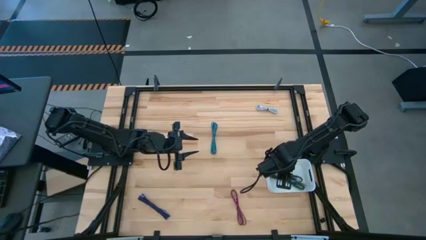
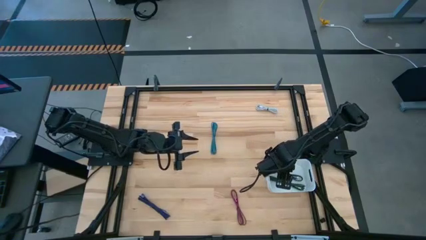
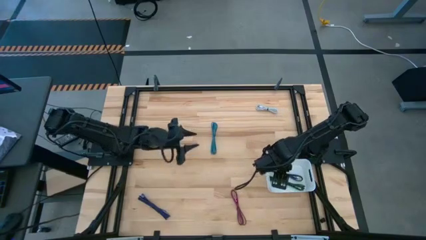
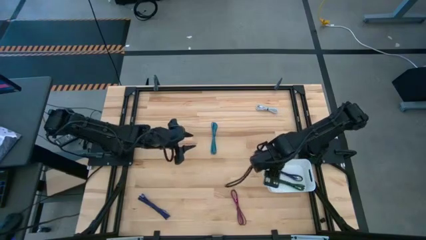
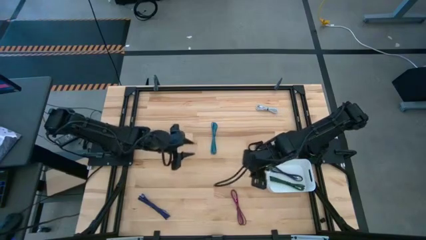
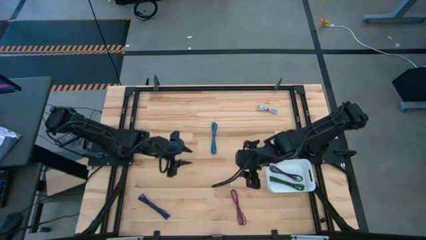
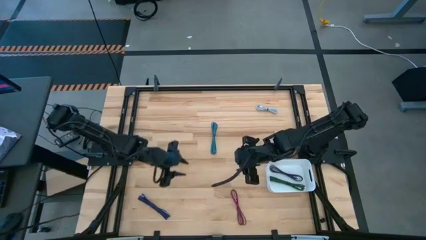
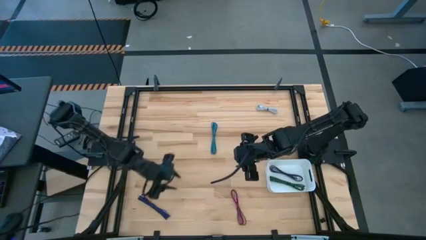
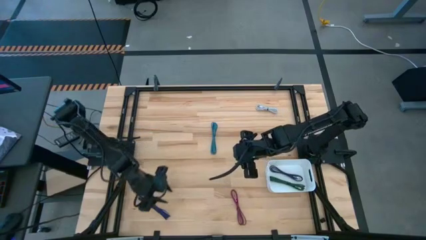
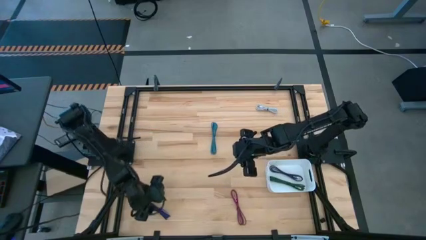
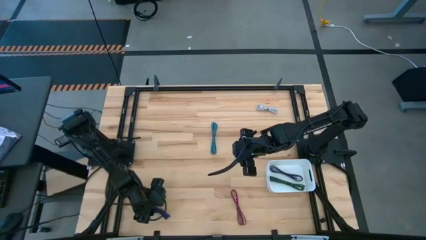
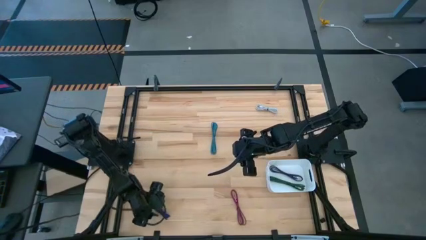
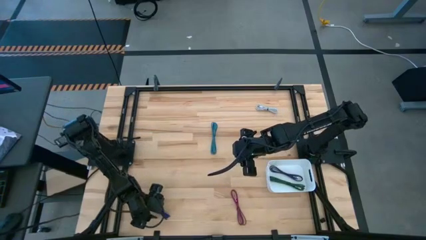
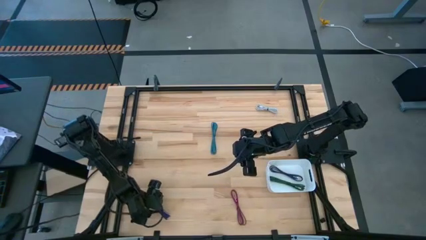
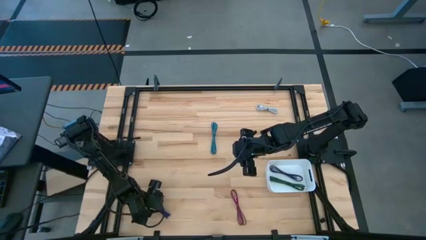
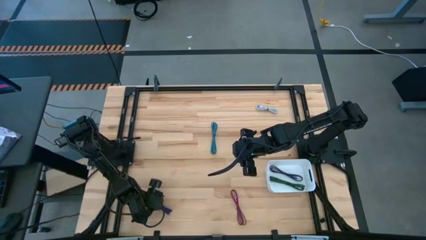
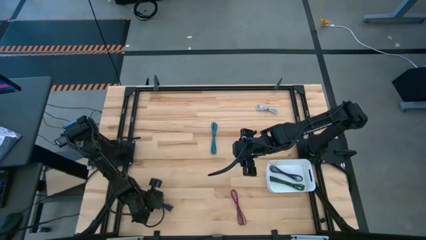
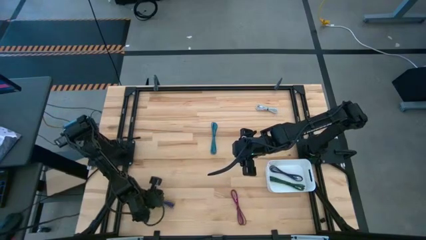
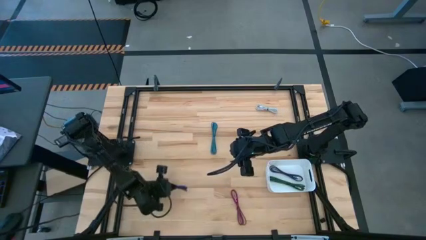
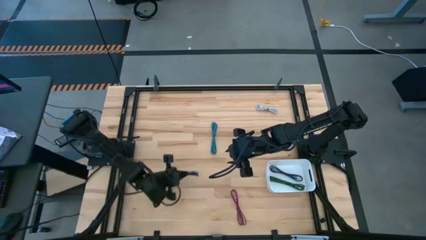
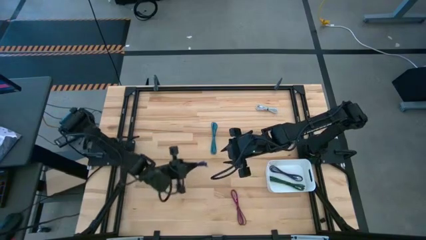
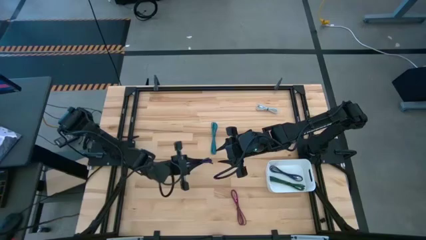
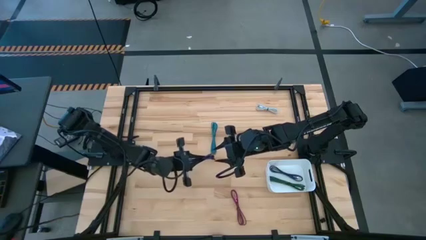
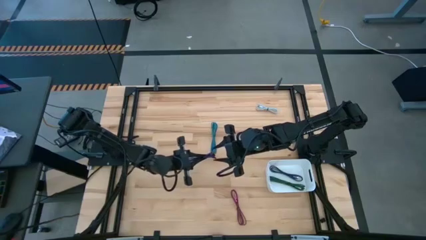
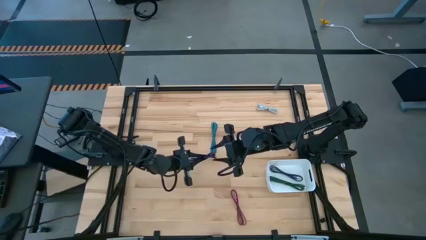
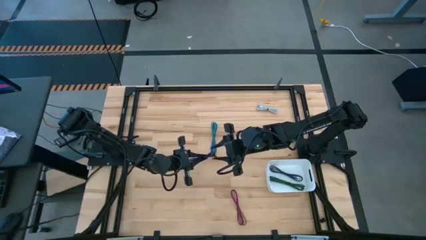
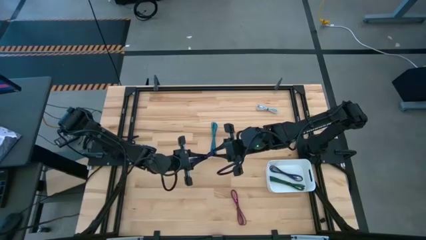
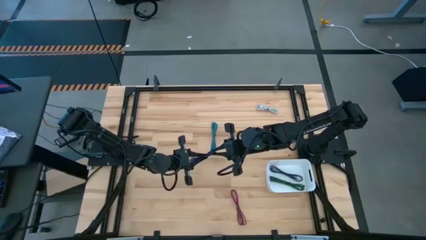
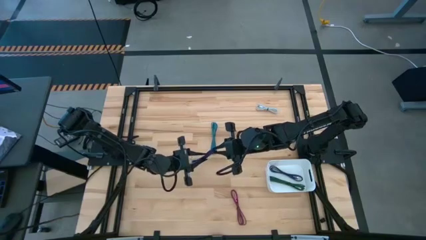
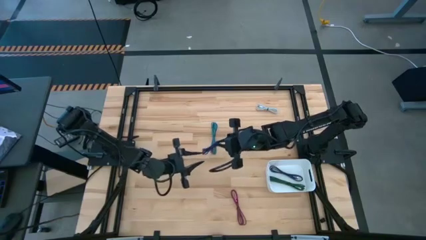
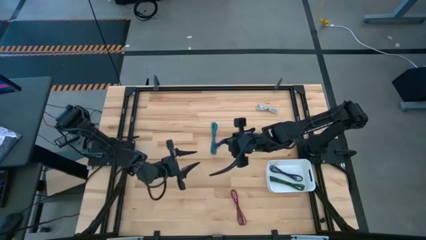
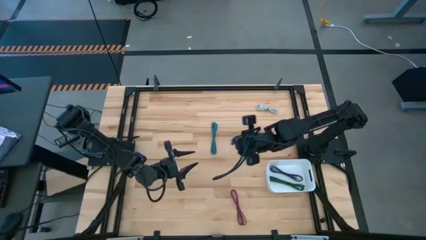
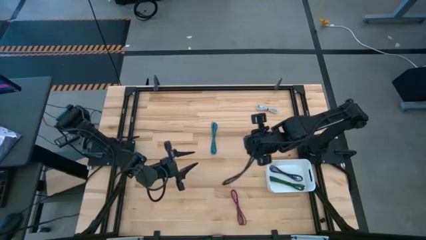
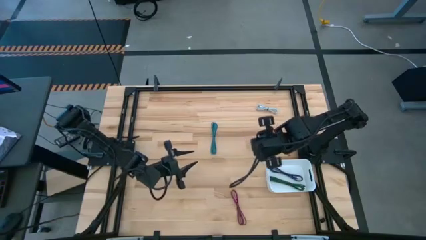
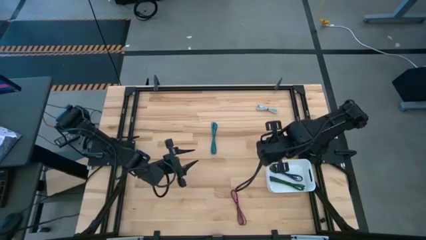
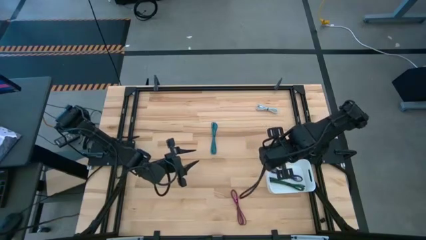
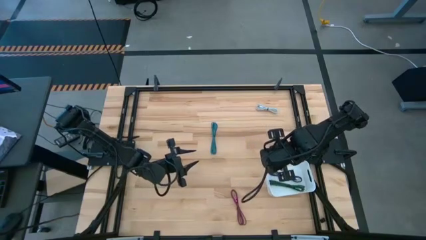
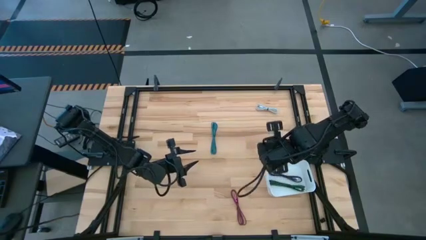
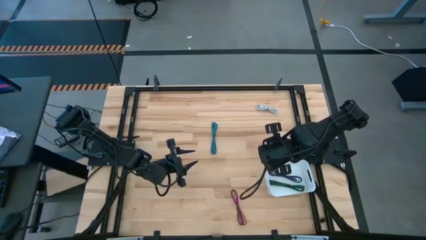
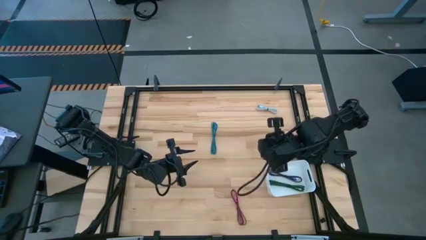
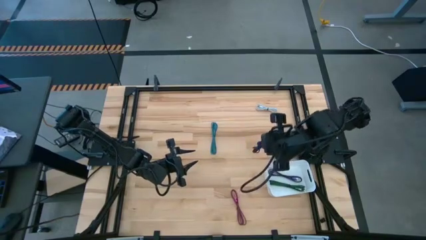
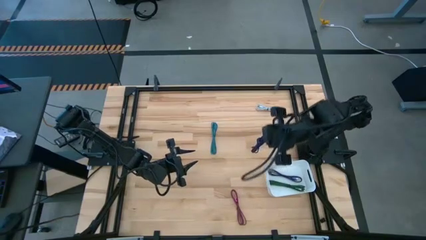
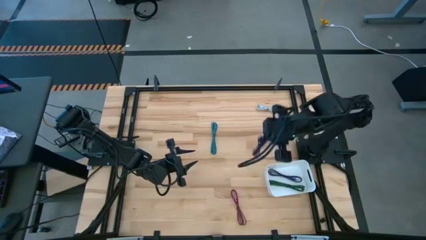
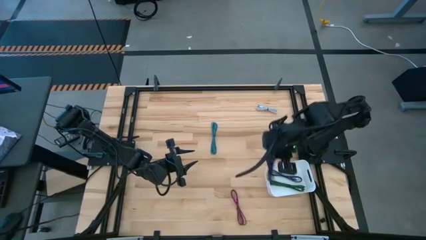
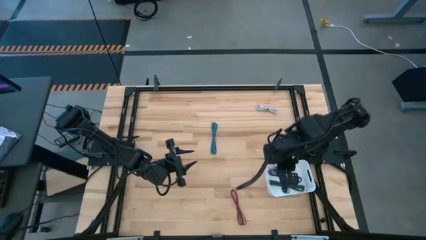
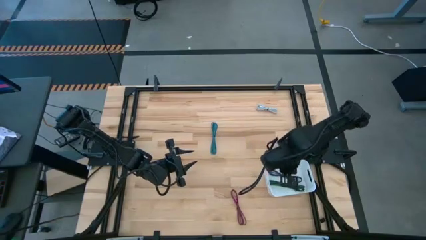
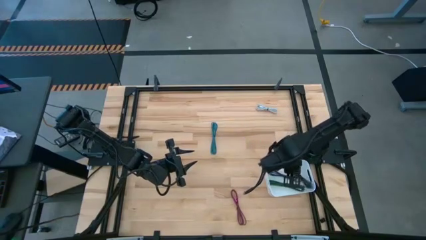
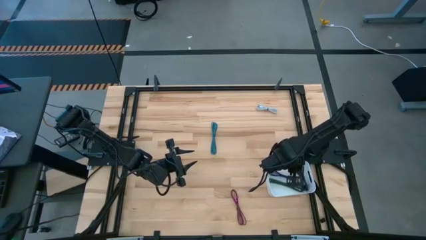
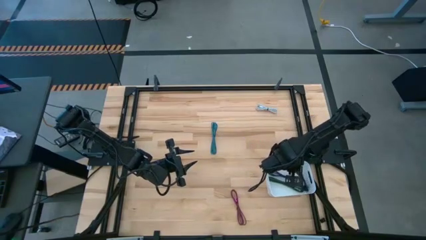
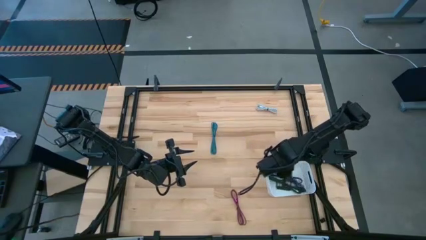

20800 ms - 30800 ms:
Task: Pick and place USB-C Cables
Put the violet charger cable into the white container

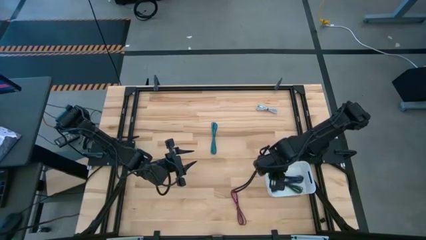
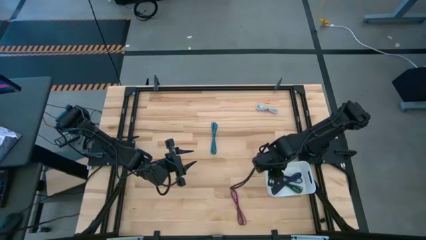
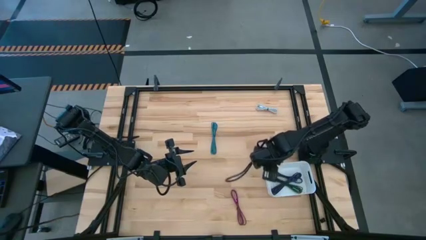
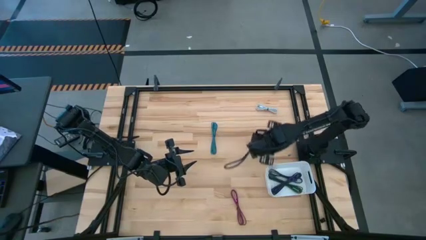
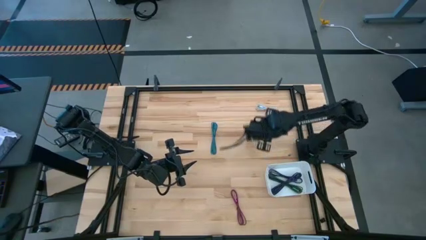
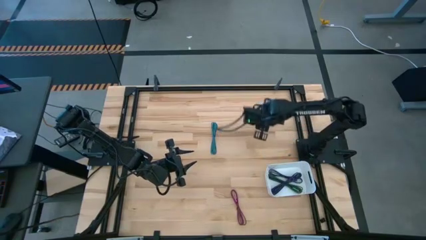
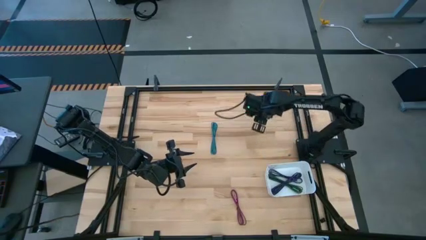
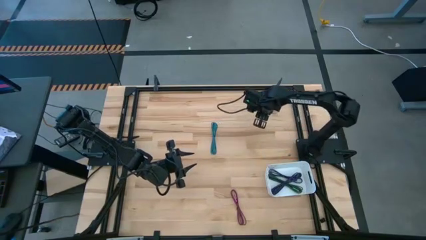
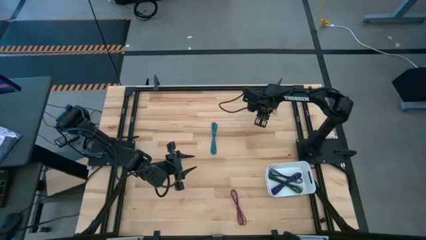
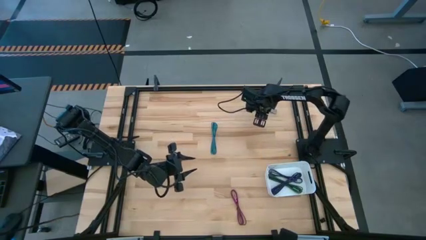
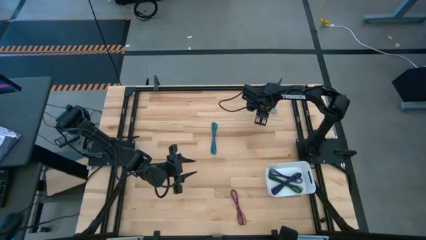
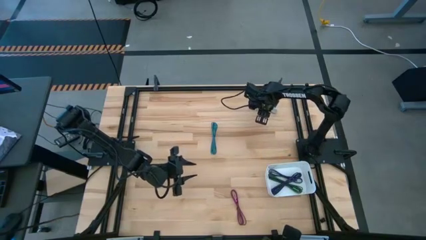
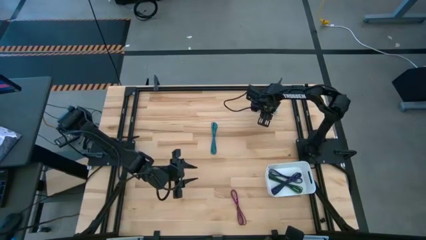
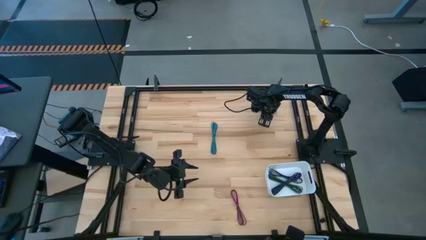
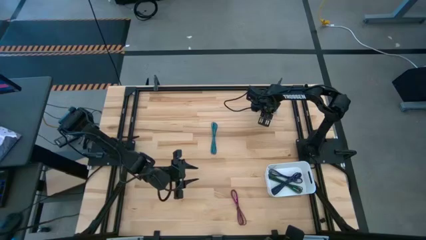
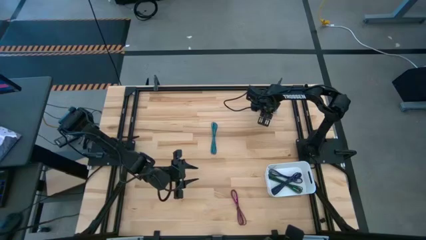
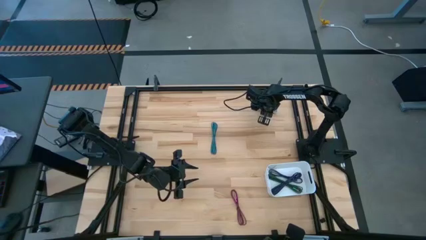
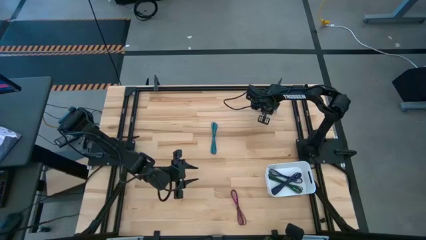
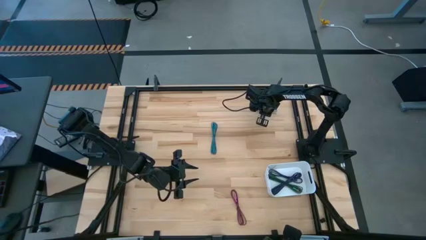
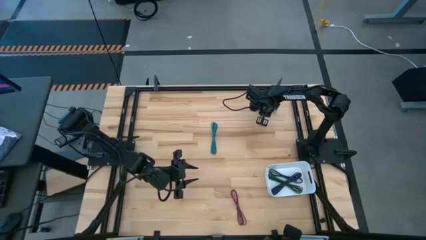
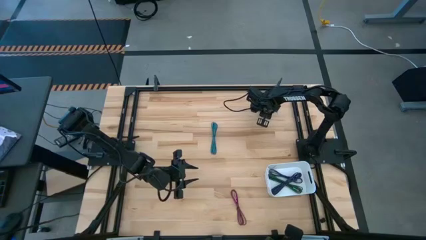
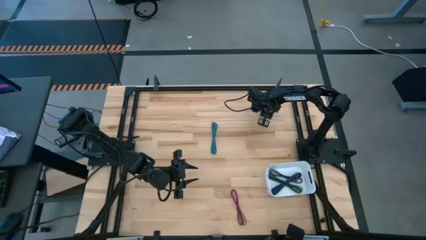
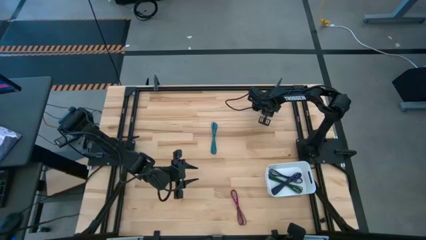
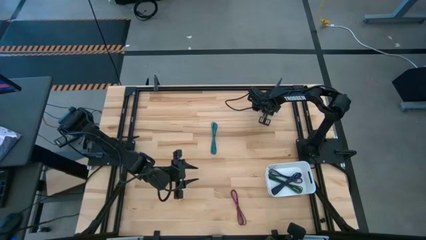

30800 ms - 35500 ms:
Put the white charger cable into the white container
